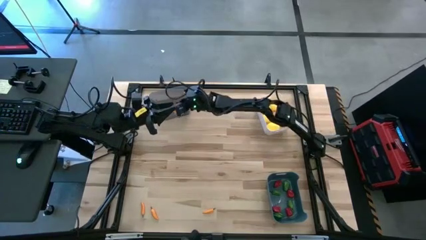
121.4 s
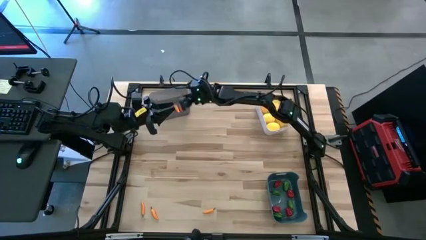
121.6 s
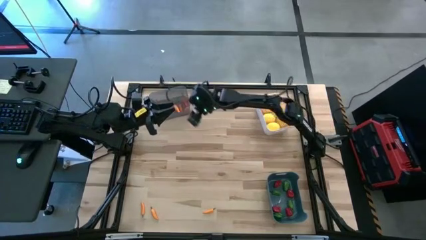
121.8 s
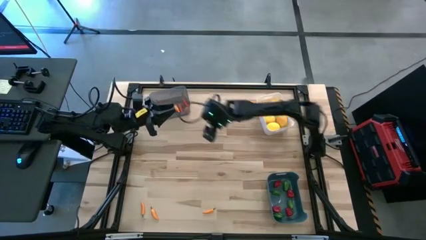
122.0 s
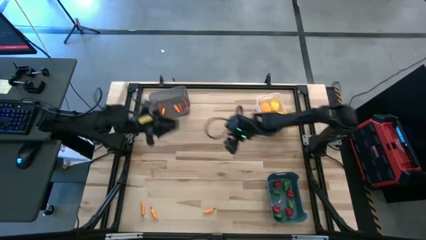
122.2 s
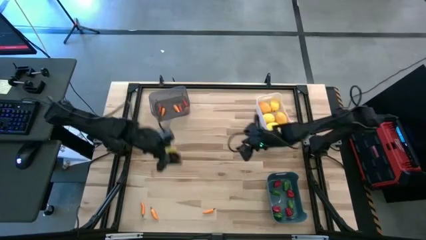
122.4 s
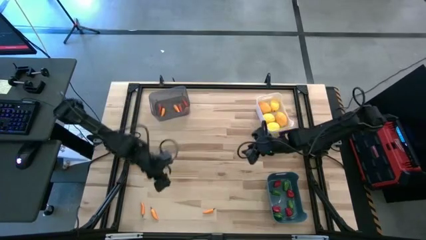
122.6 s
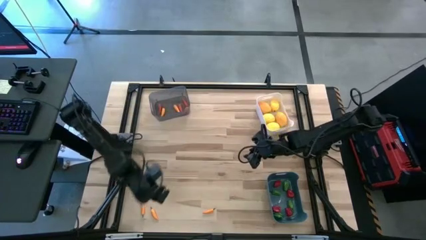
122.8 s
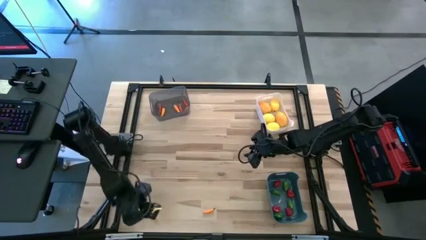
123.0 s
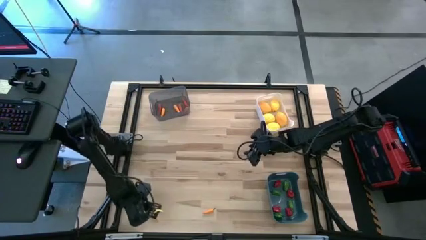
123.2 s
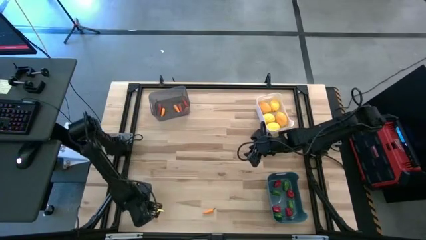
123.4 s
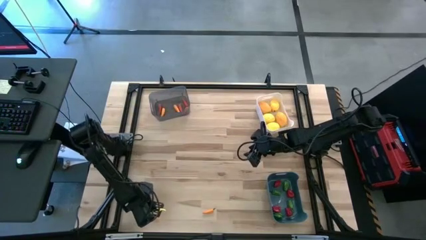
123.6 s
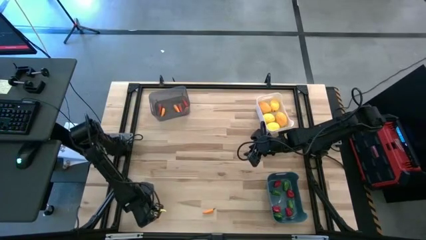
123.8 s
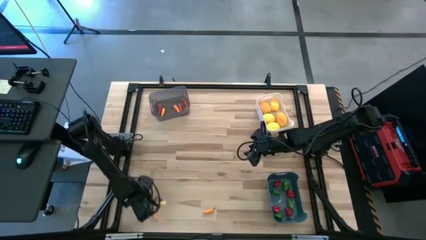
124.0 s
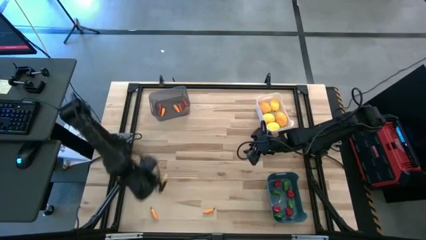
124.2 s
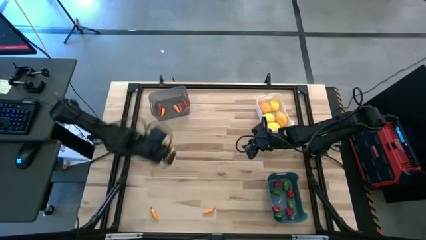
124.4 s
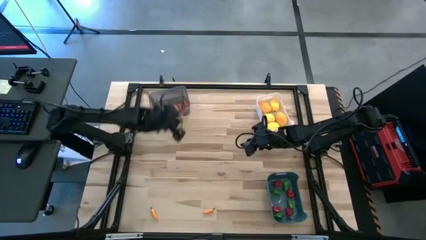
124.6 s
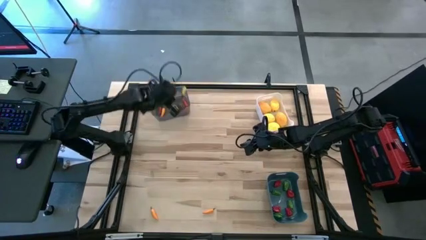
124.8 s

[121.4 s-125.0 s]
Task: Sort produce into baskets
Put the yellow chili pepper into the black bin

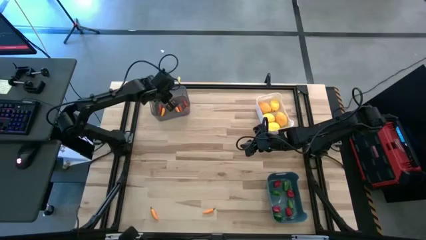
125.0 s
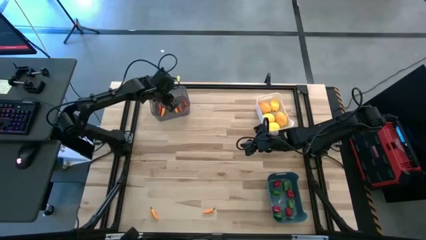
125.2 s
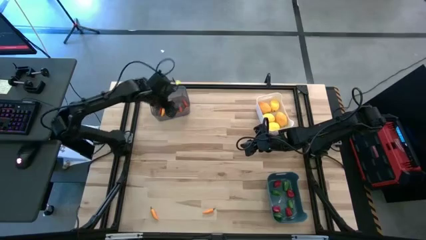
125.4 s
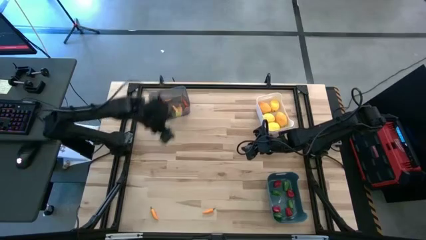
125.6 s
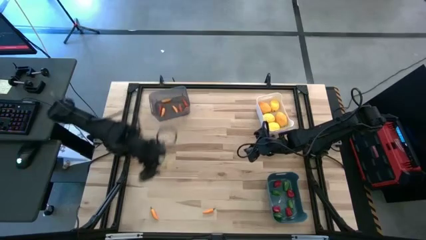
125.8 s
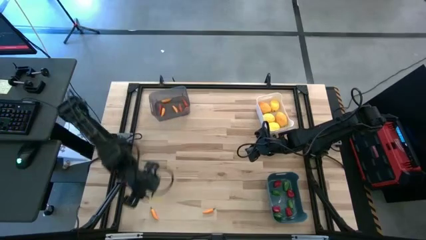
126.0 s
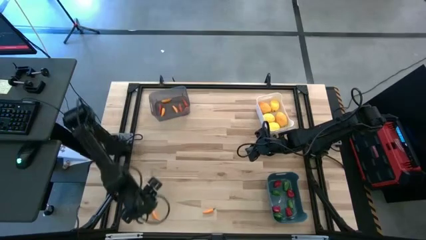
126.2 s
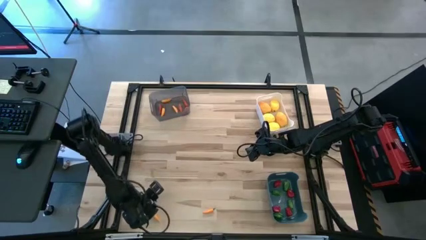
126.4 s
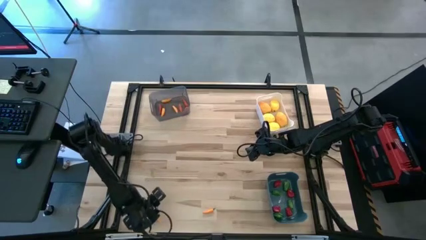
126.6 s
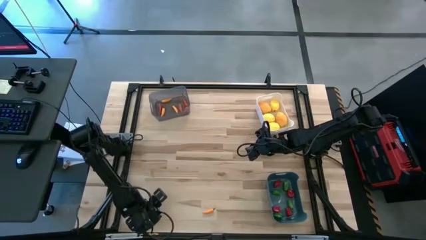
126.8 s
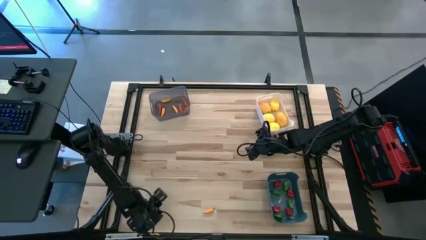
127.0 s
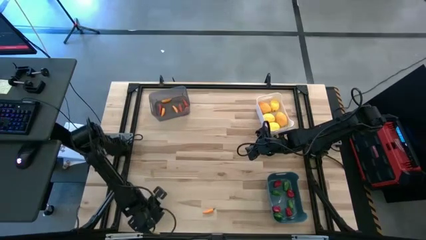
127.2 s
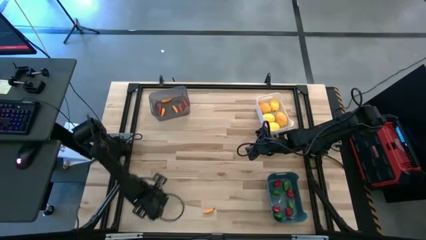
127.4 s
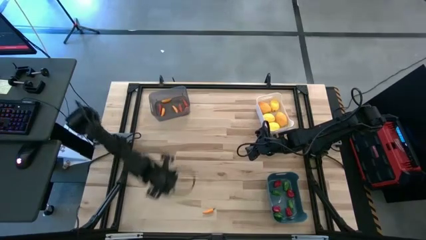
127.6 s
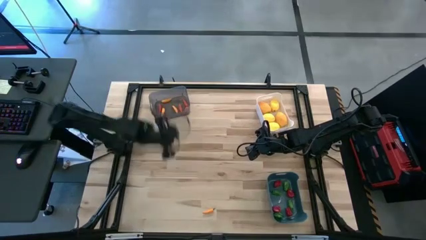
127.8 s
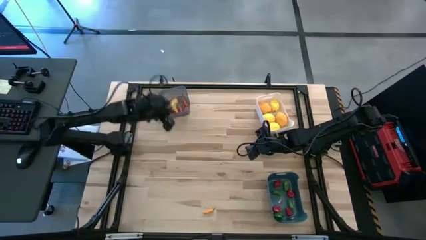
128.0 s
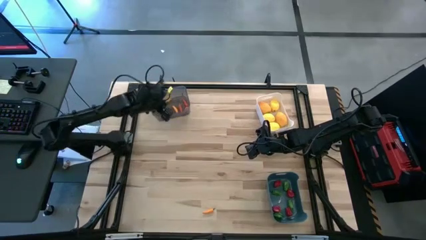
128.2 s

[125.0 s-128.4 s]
Put the yellow chili pepper into the black bin

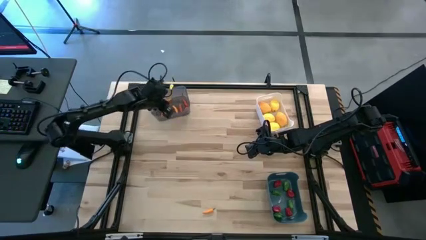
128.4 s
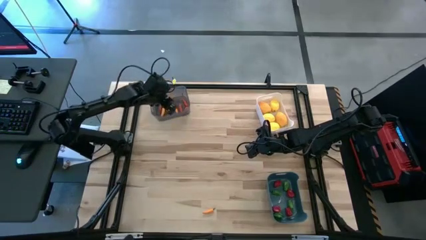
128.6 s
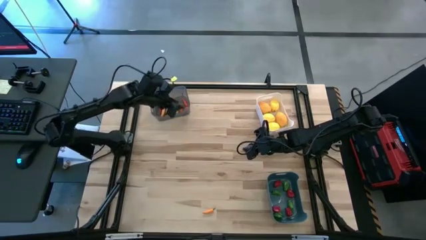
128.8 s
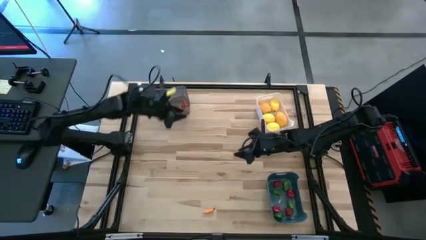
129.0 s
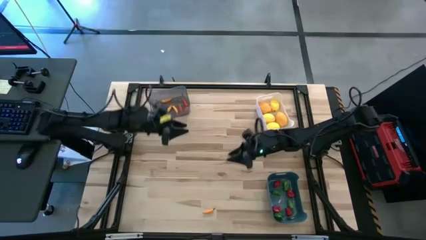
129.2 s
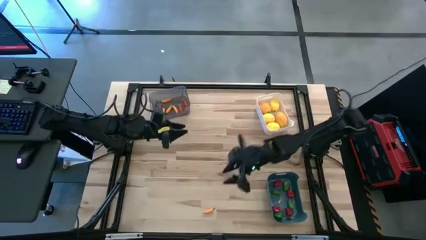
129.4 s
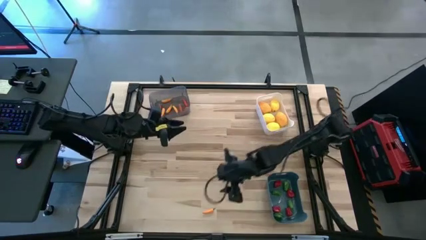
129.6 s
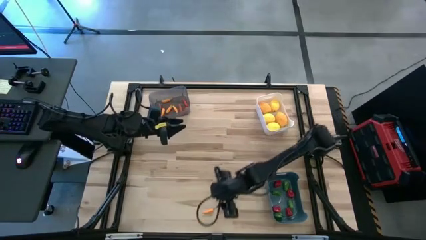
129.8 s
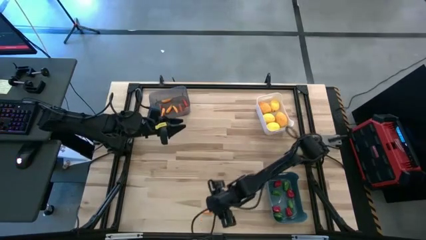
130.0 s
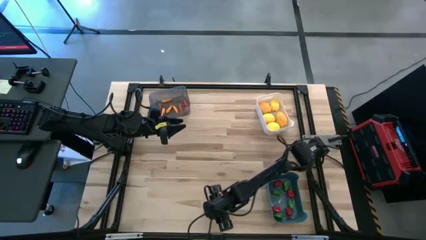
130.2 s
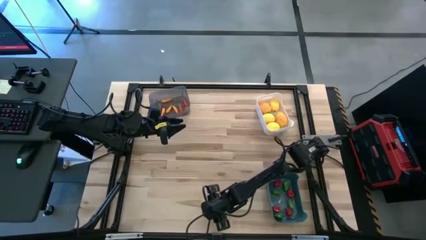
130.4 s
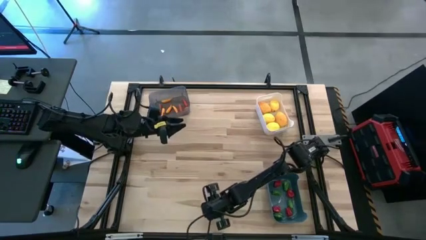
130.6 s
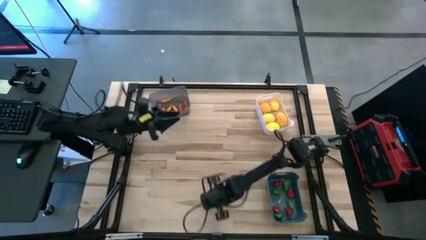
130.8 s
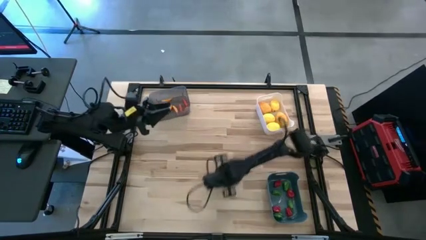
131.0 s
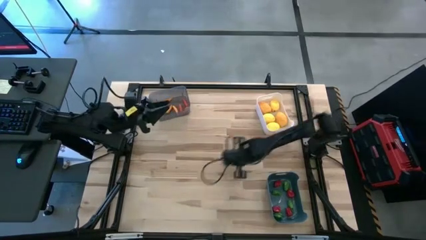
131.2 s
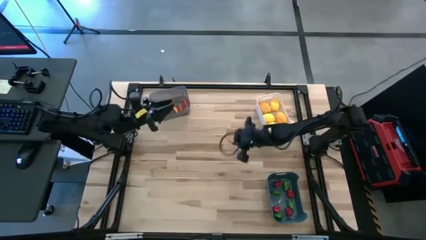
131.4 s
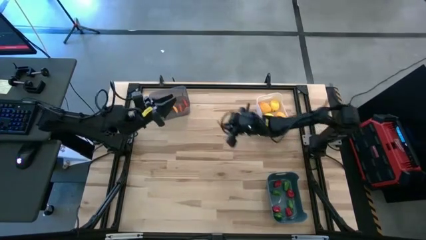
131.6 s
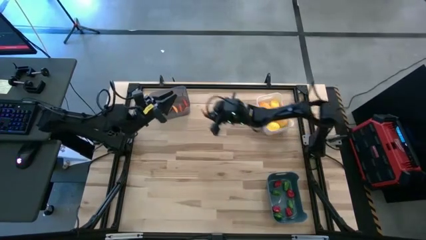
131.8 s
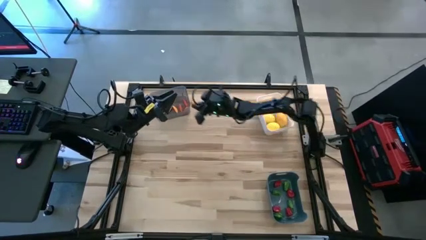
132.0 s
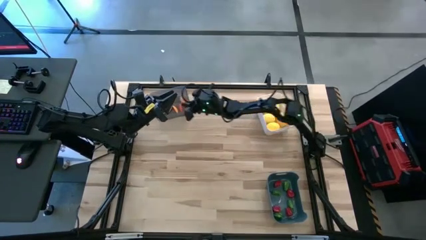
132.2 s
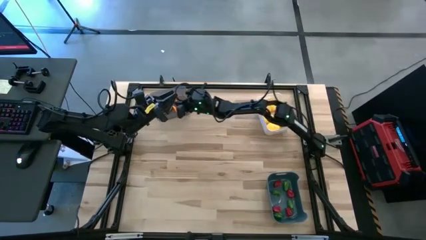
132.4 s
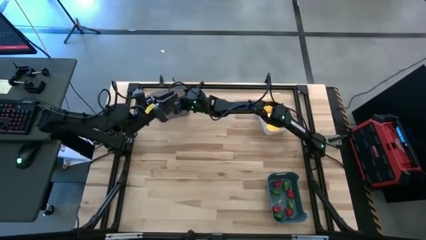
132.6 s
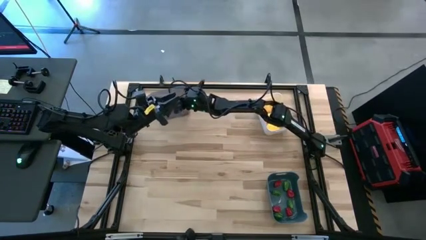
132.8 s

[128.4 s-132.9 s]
Put the yellow chili pepper into the black bin

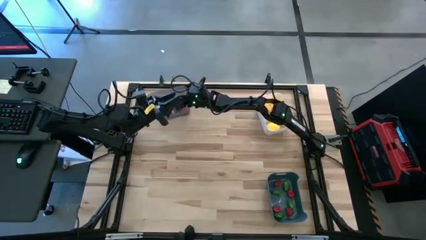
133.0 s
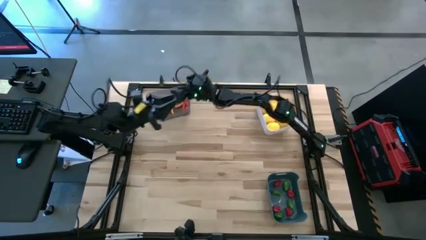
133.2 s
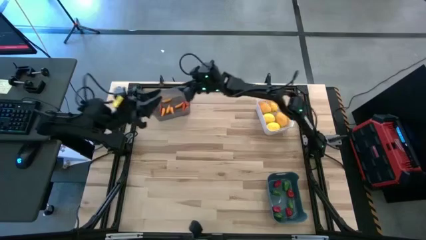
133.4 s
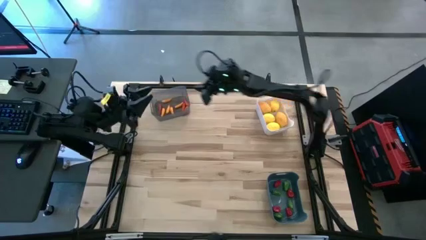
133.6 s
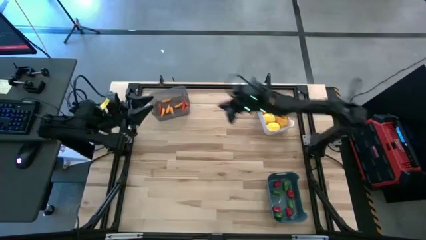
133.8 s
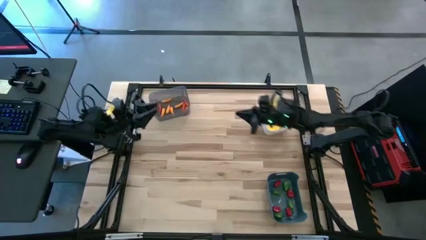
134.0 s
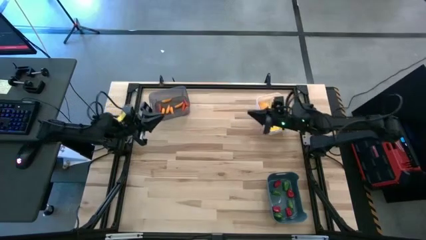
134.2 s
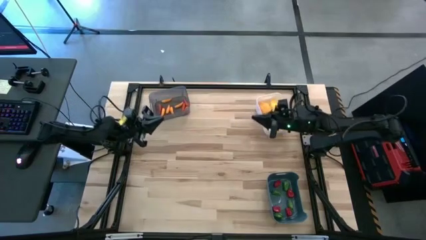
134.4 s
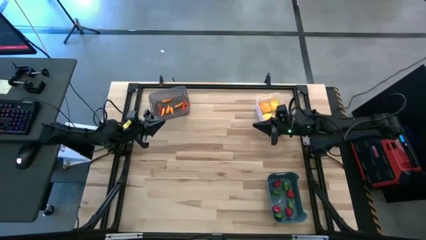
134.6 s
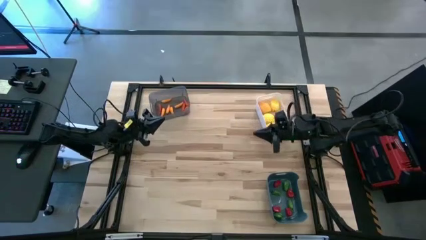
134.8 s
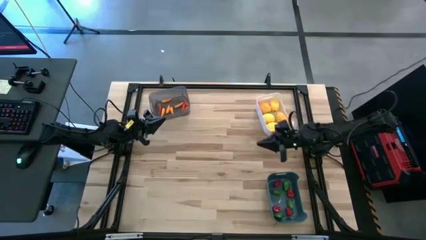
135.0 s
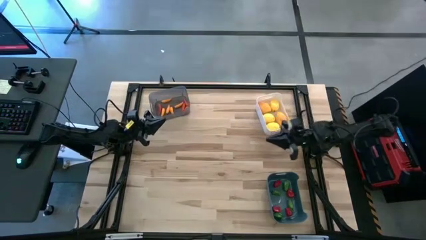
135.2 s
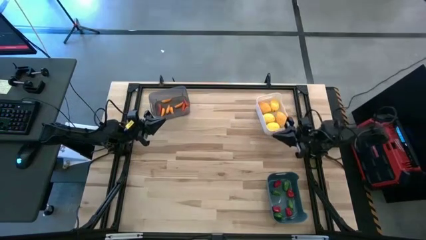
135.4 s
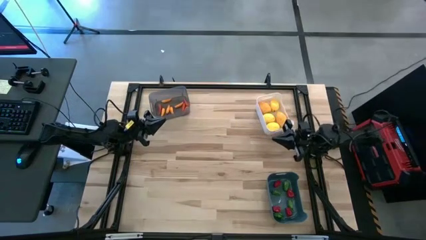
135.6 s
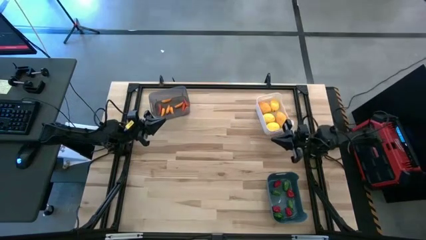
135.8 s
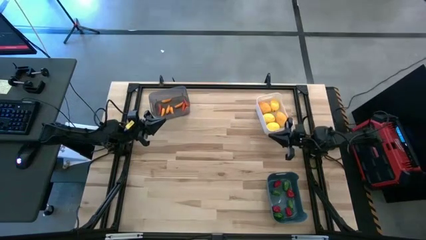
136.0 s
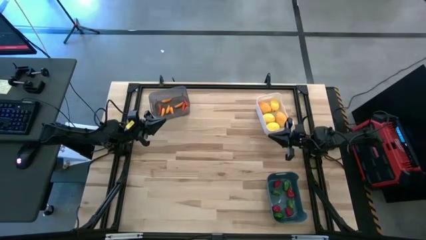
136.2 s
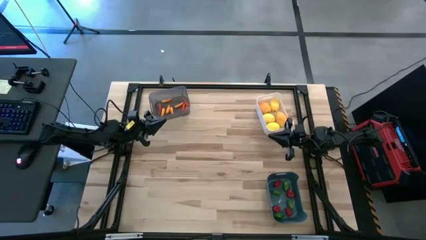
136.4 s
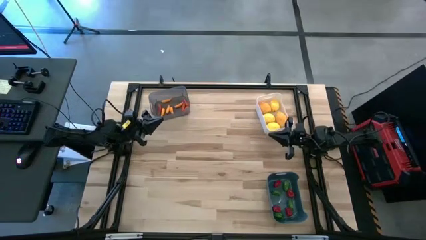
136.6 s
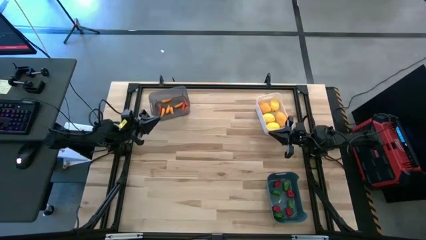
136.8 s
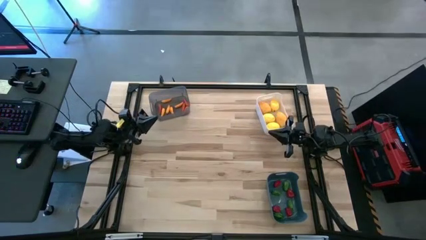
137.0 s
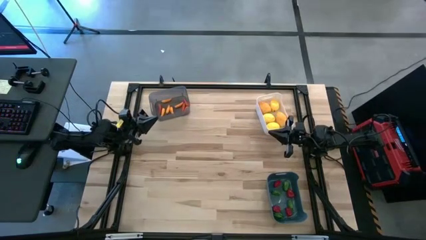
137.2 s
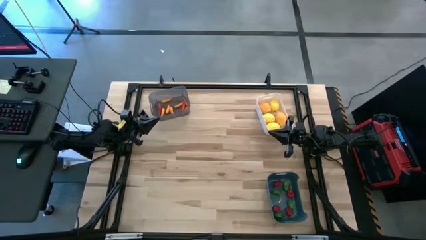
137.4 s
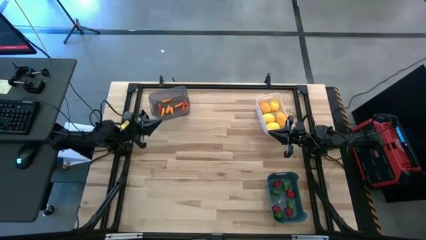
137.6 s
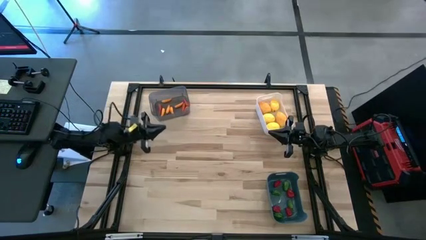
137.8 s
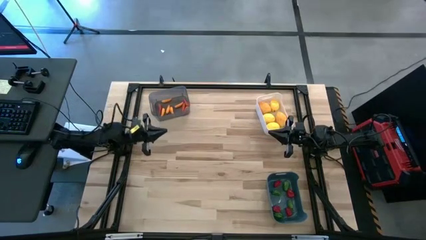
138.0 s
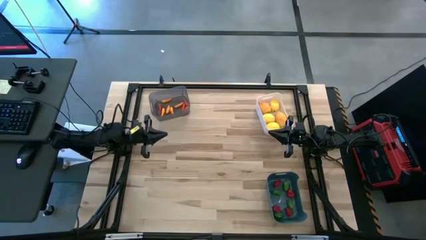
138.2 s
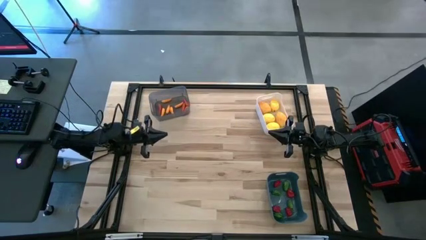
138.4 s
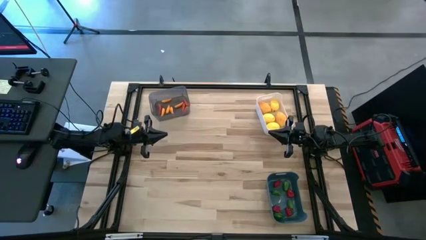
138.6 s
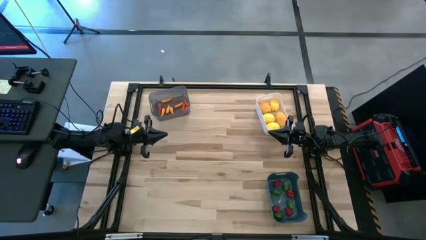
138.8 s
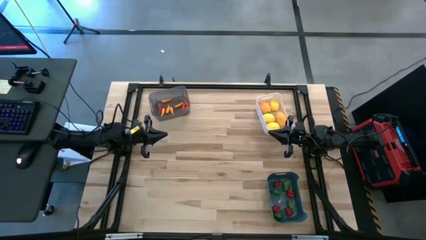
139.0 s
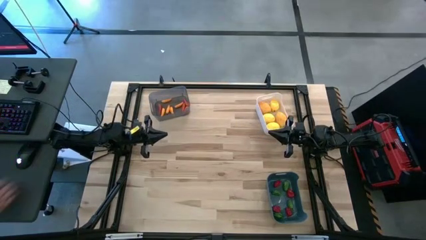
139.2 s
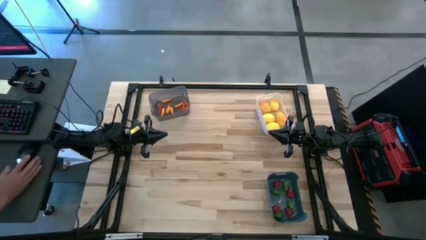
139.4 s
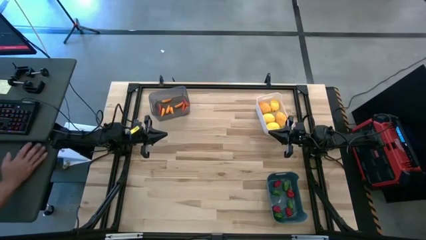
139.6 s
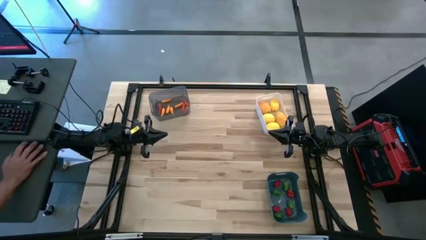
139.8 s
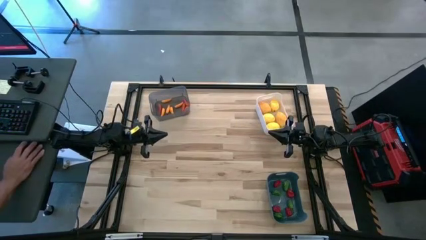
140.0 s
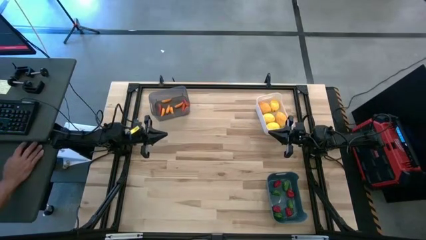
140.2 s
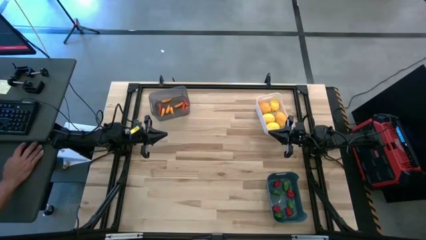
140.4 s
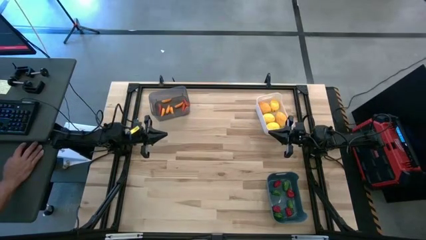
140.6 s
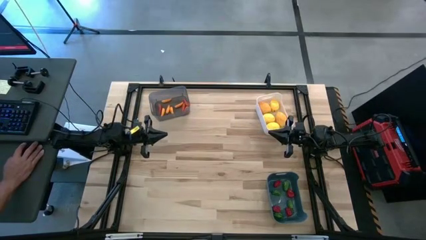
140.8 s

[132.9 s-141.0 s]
Return to Home Position
